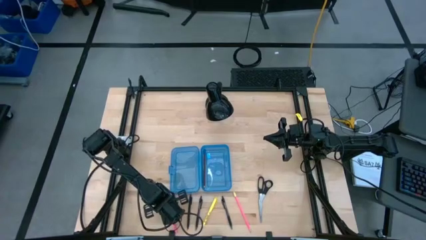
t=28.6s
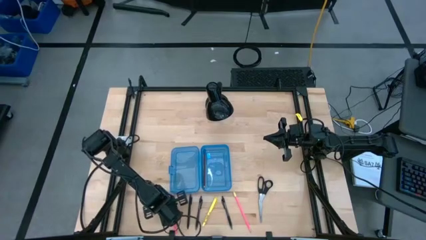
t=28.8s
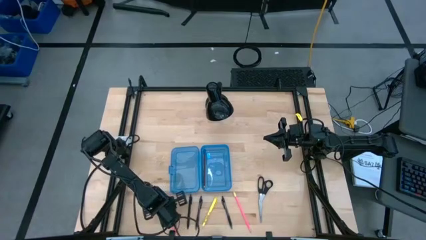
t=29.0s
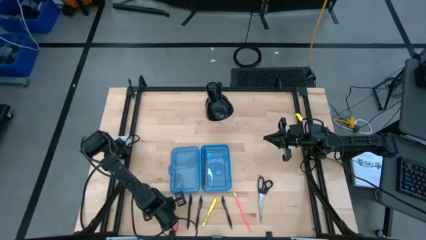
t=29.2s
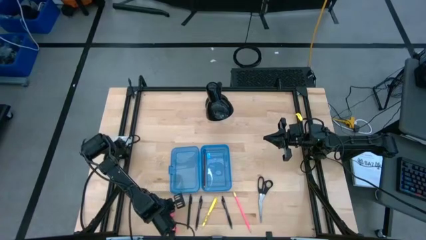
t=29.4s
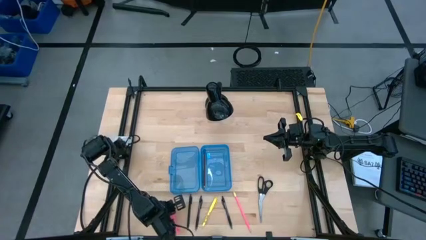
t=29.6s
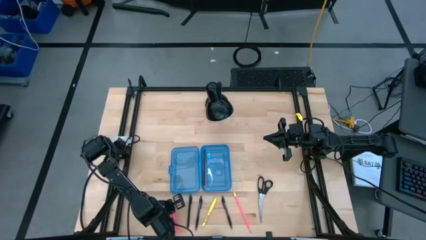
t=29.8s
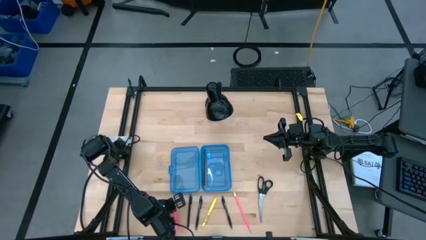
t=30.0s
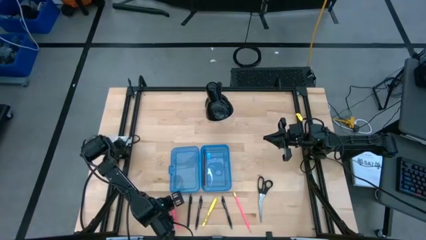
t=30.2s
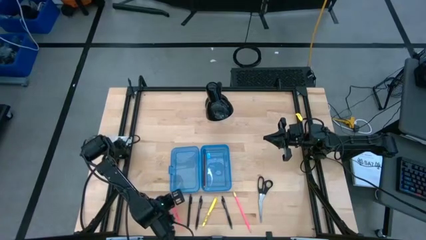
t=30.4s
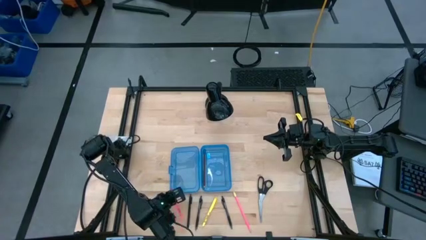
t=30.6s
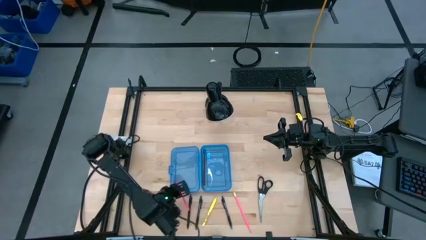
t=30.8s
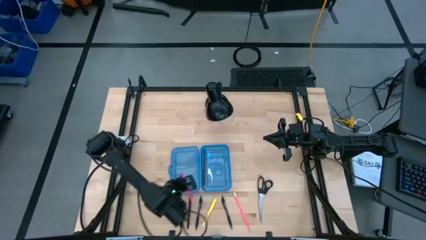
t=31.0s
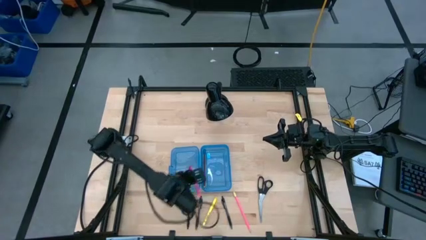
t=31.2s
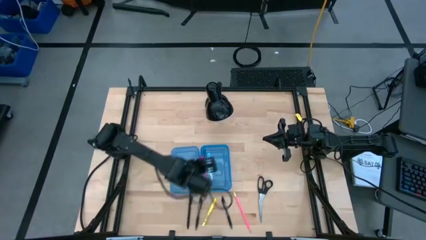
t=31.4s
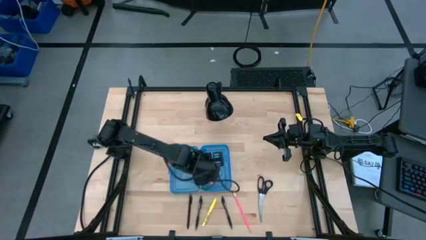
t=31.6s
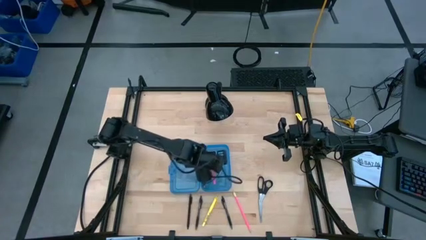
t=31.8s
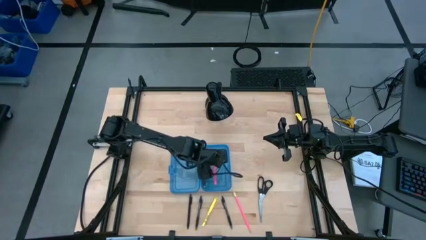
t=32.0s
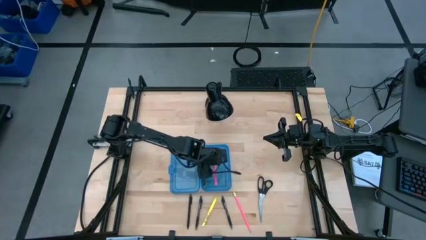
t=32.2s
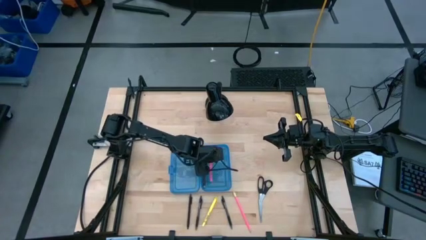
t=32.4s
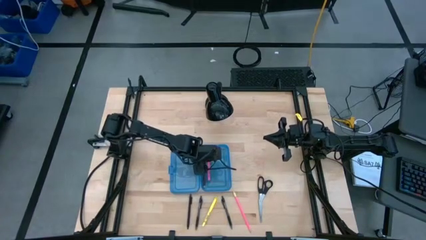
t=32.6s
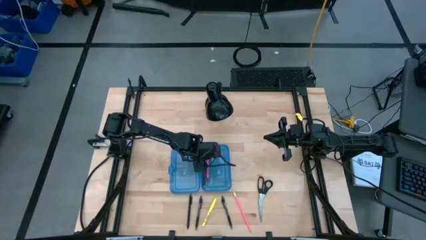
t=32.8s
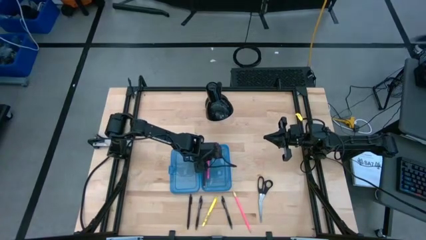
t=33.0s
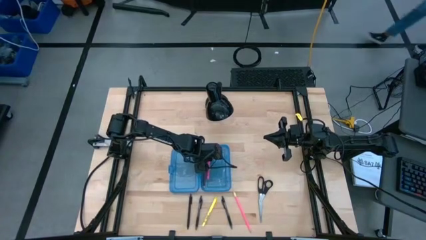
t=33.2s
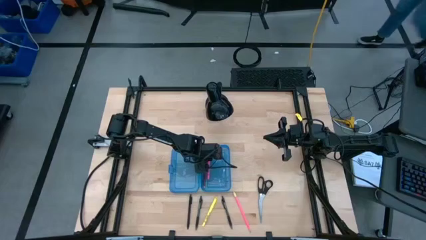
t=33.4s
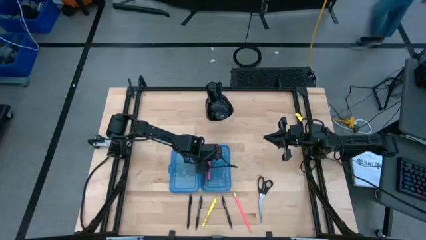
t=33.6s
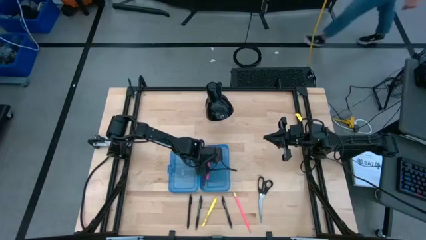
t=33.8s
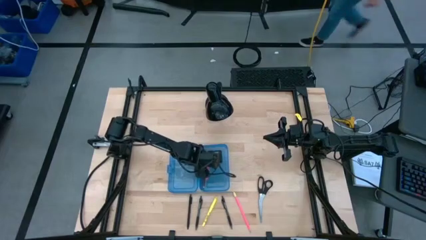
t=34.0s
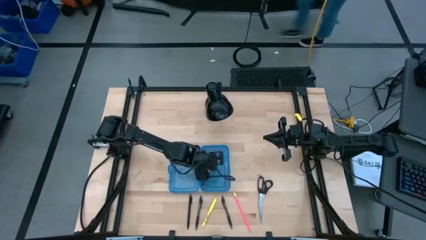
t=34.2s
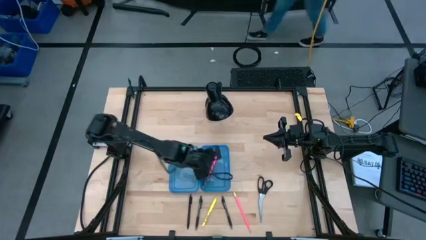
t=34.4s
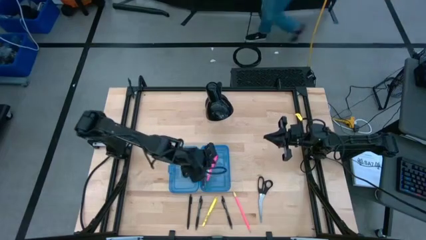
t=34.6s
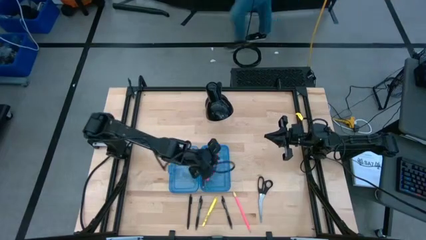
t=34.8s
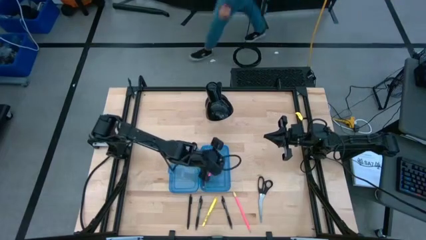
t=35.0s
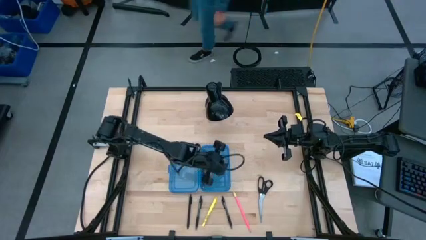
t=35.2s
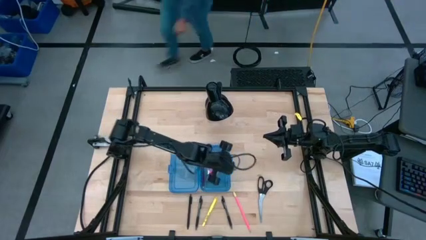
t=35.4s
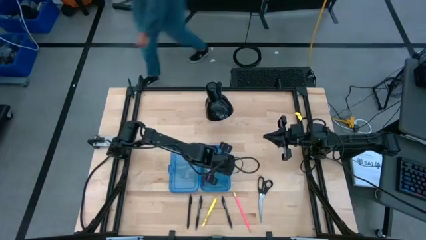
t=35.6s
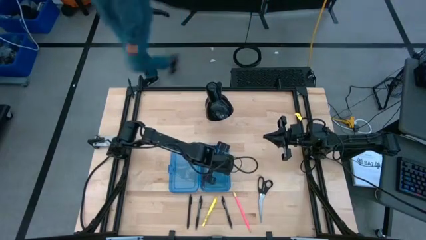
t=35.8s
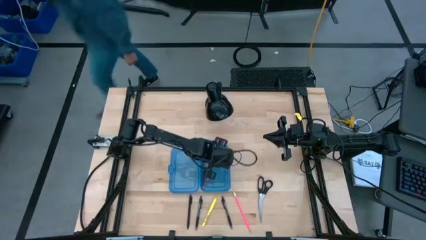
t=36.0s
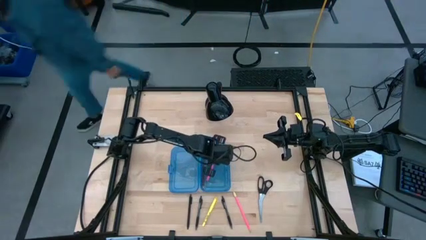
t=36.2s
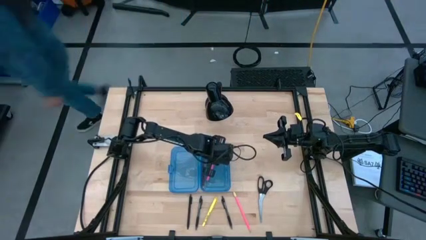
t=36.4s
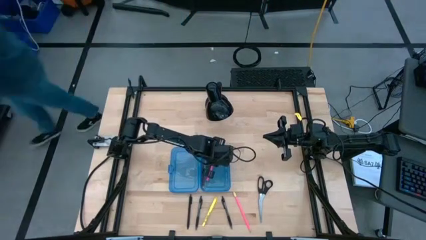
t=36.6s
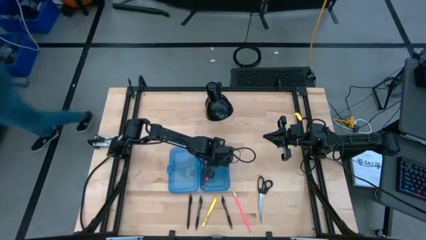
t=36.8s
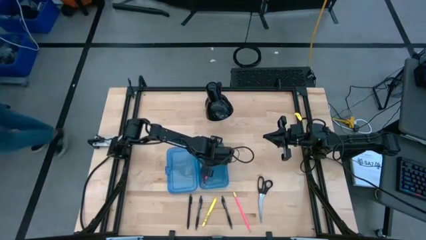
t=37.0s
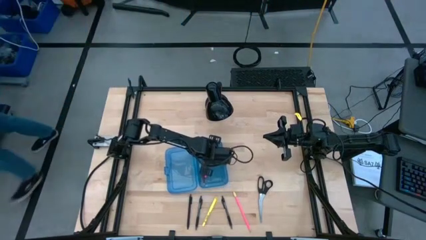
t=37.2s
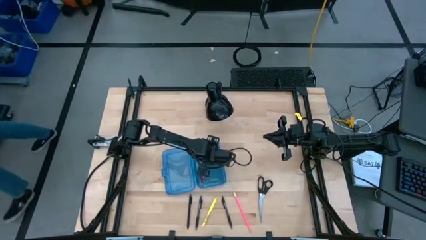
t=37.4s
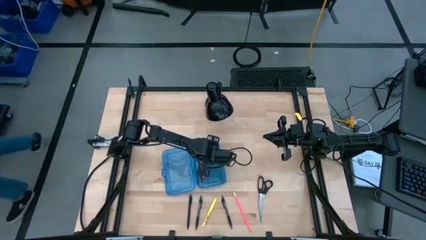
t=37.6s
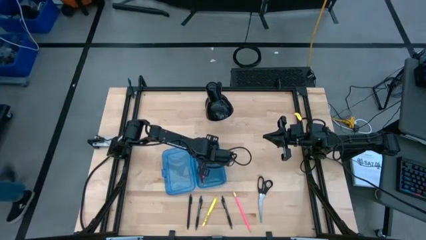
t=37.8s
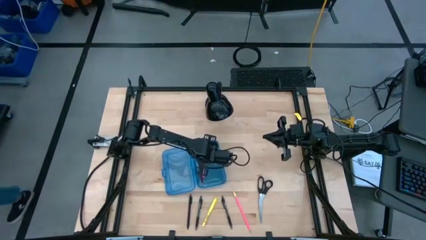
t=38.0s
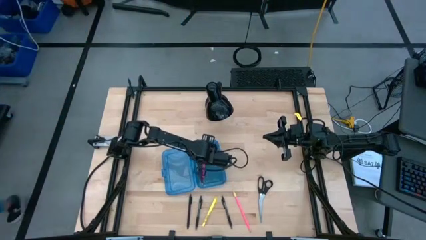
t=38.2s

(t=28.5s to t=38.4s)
Task: Pick & place school supplies into a supply box
Put the pink pen into the blue supply box

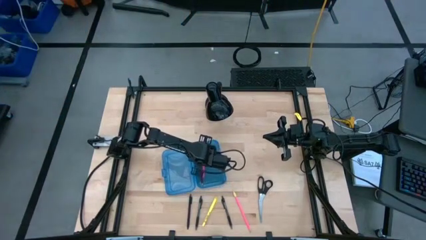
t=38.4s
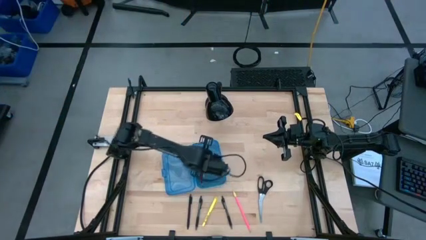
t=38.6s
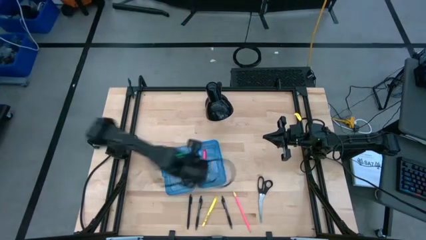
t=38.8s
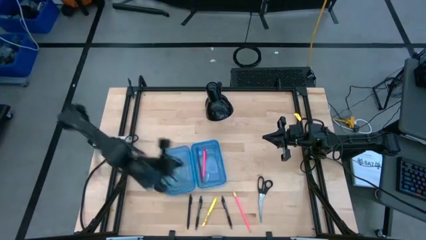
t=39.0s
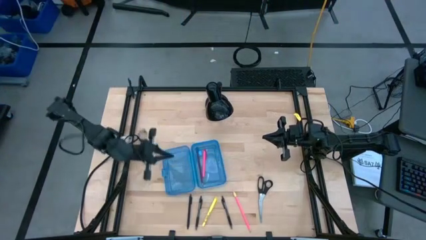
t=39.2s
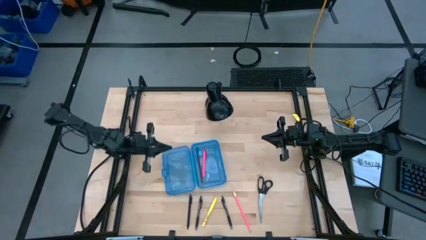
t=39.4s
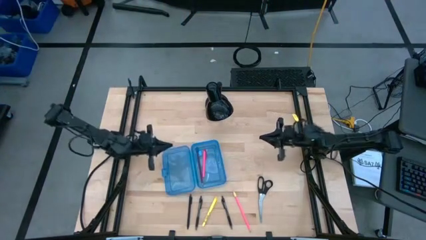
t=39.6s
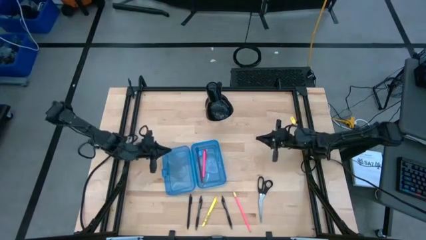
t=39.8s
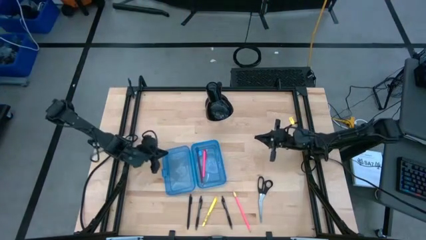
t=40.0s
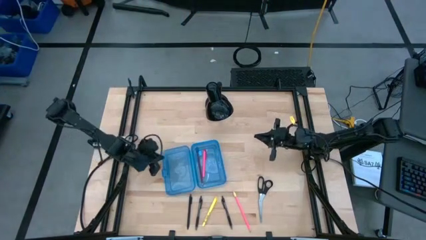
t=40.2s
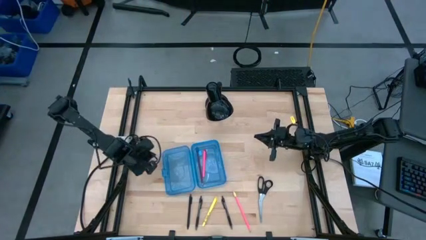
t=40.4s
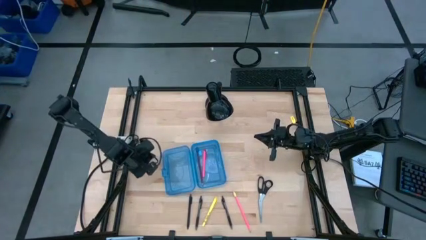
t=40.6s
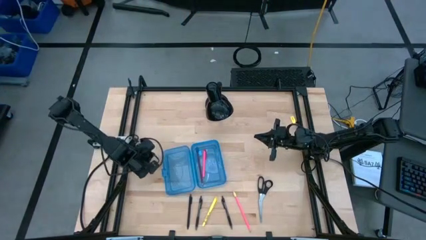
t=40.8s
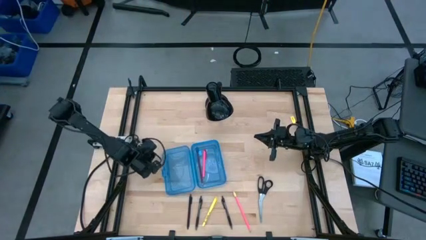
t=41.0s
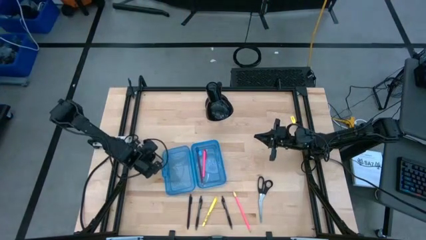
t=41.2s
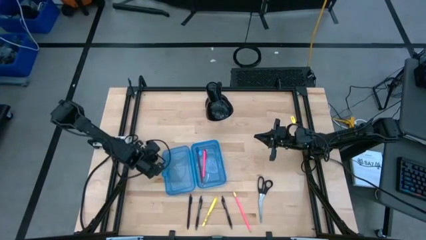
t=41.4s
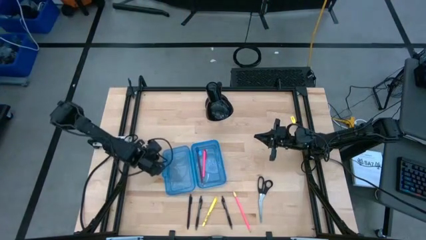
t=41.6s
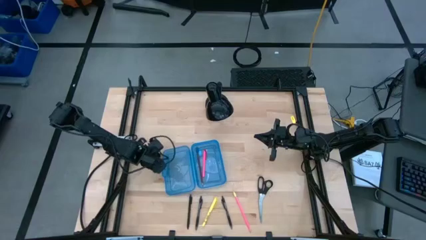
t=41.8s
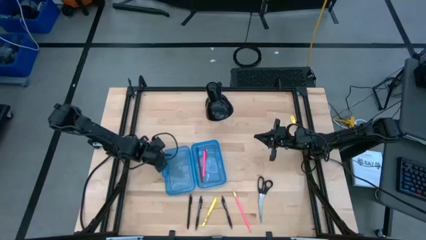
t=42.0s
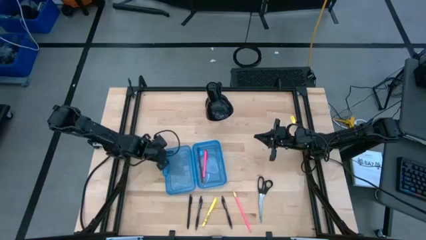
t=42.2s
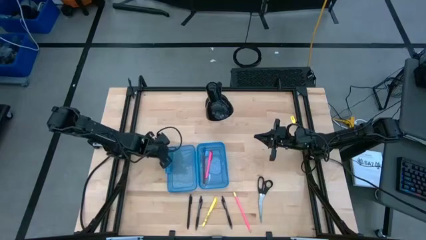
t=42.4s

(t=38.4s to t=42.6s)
Adjust the blue supply box on the table
